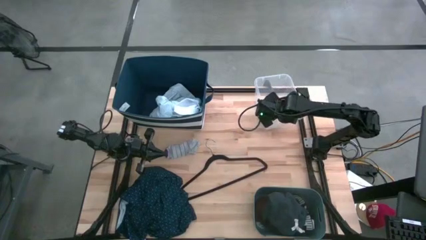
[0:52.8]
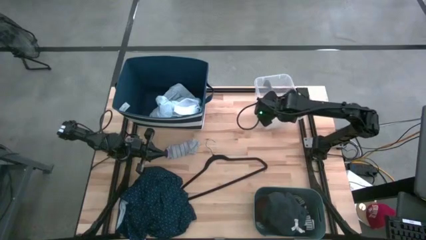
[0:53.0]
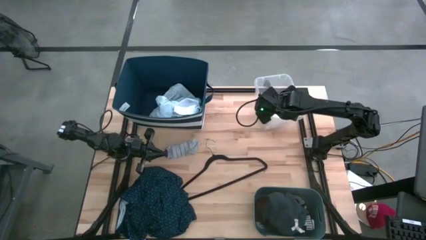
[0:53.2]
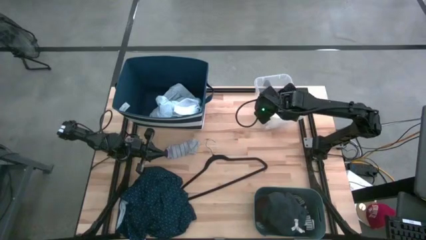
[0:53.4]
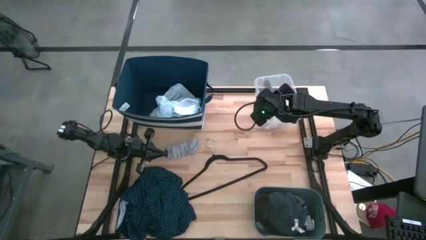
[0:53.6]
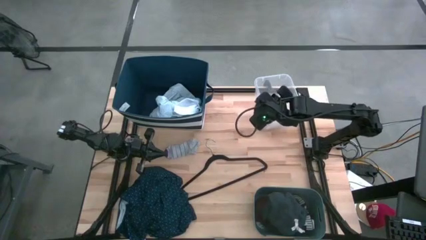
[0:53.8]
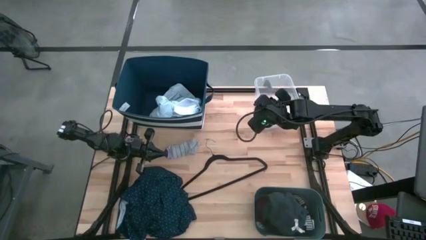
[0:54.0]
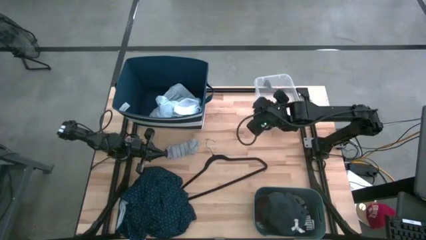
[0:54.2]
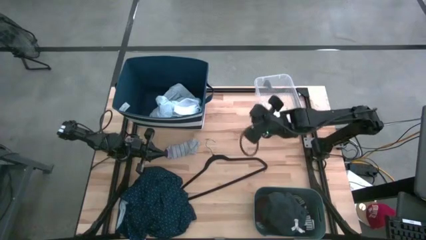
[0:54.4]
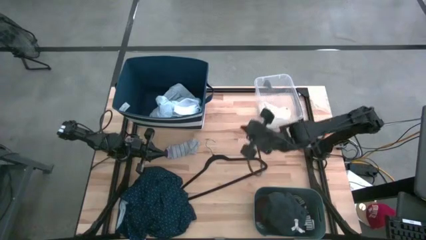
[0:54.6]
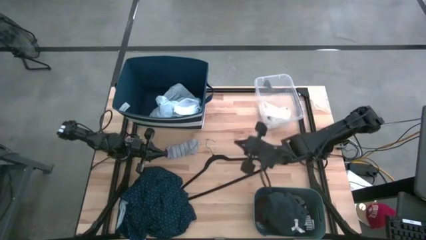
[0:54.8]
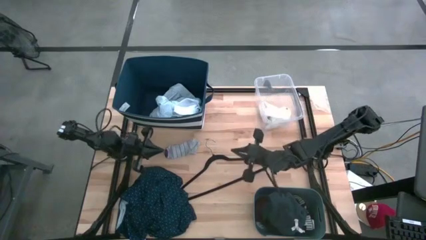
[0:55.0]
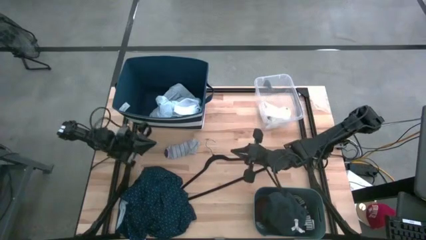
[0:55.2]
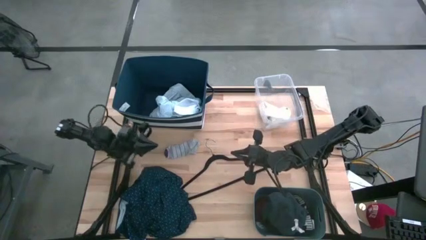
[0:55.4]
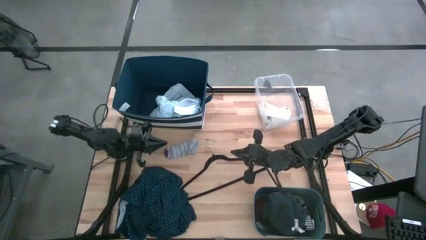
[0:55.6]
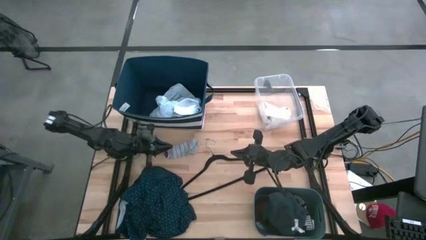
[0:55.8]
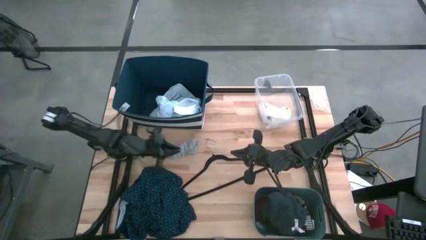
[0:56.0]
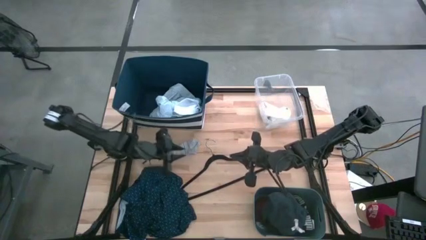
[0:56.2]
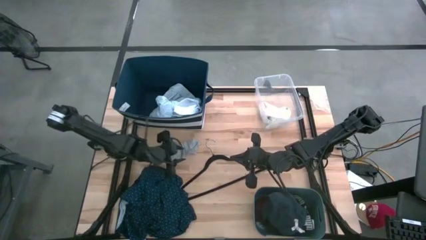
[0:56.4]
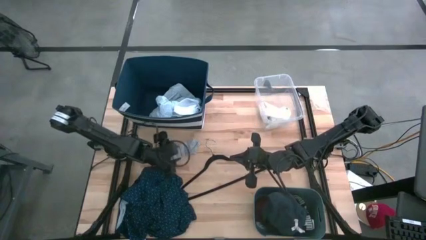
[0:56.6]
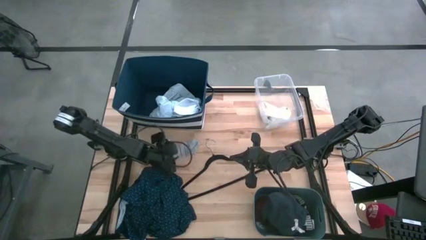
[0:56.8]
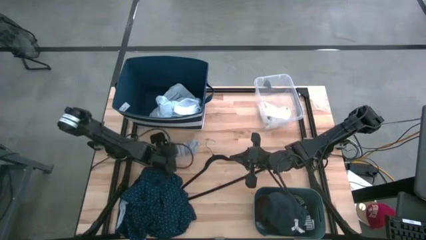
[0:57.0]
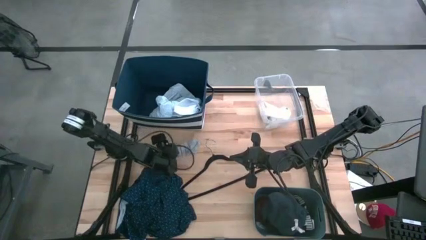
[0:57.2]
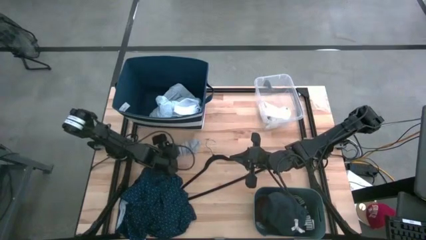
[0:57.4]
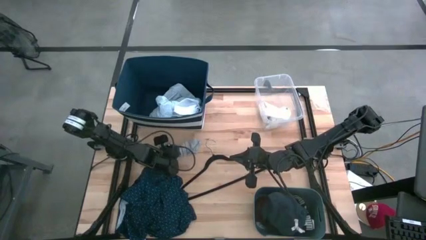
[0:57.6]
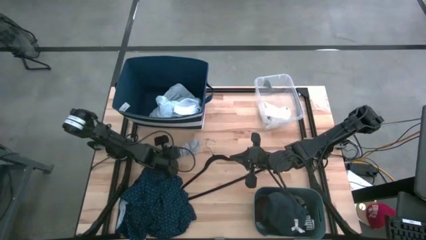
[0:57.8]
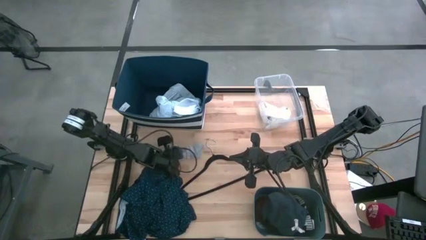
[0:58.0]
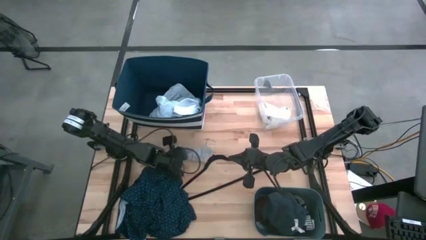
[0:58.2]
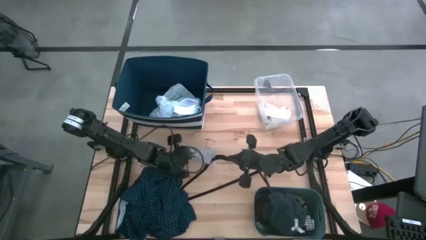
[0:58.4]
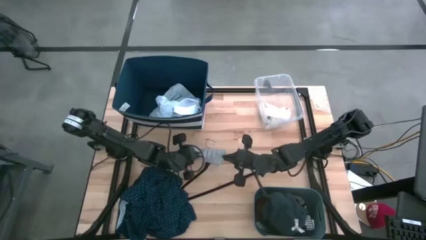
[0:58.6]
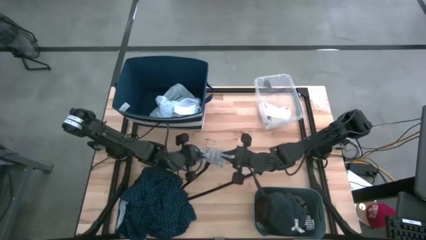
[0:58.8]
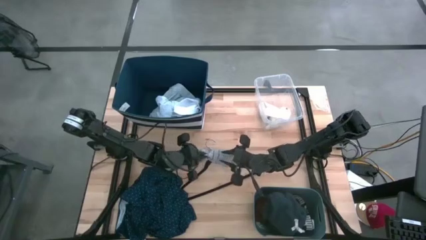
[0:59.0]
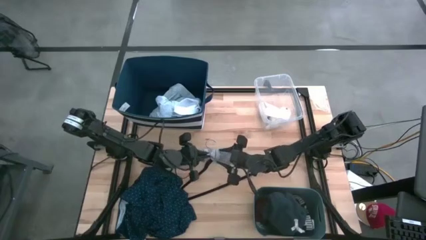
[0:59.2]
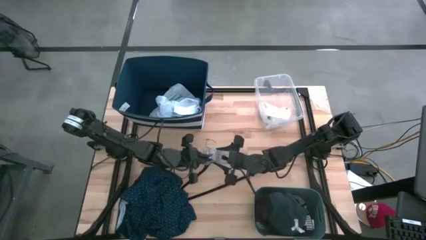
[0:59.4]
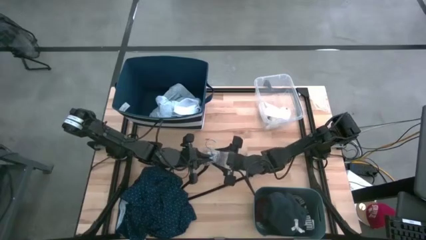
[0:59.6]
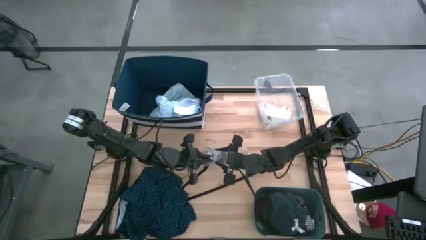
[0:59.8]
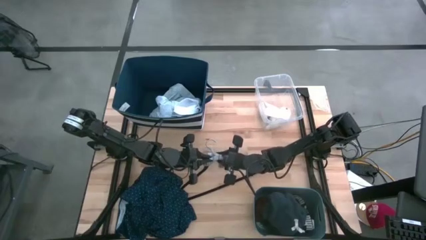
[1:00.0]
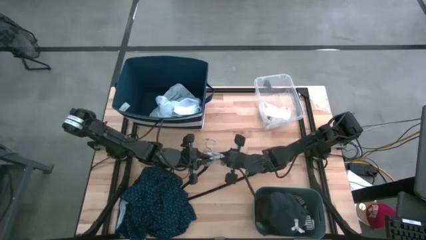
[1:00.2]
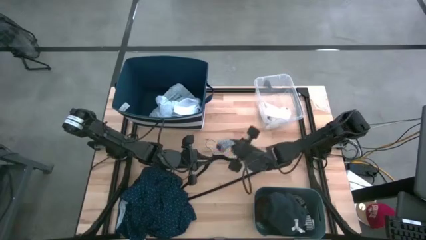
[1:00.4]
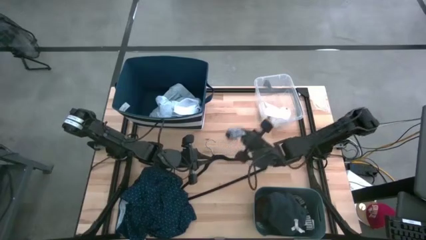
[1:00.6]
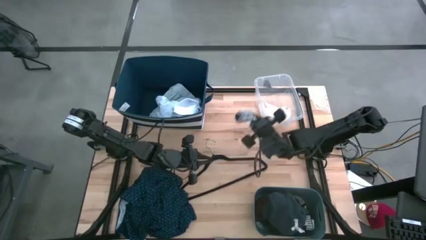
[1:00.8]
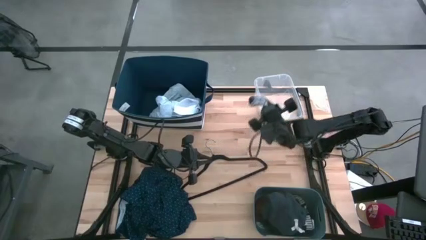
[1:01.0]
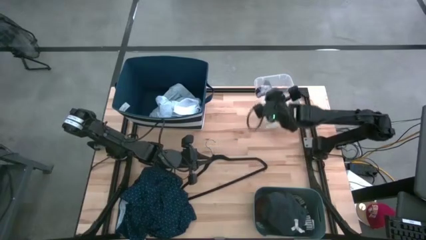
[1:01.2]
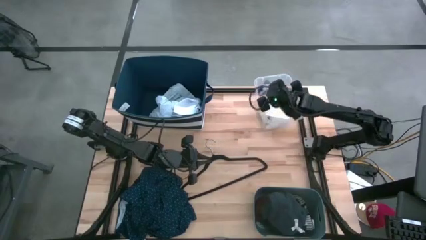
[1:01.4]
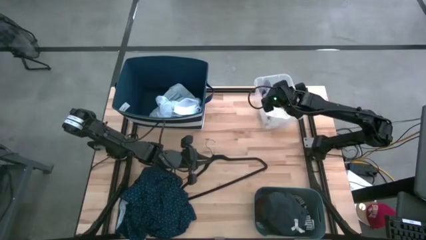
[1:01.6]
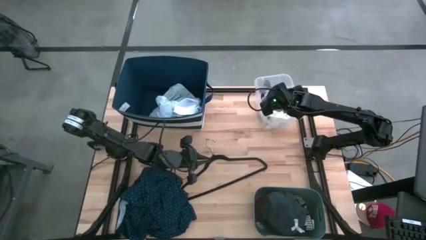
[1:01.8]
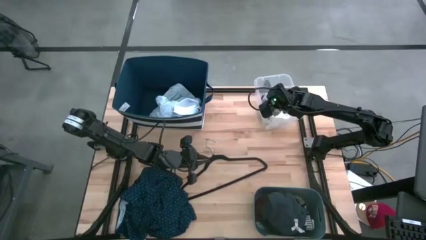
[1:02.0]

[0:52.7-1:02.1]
Task: Pick & Place Cloths
Put the gray sock into the transparent bin
